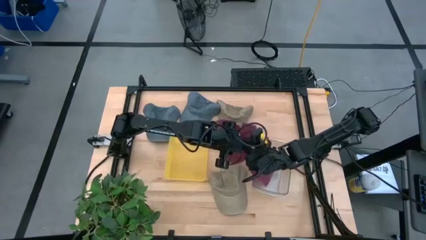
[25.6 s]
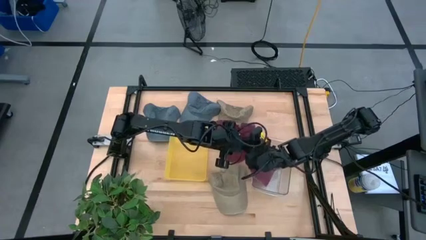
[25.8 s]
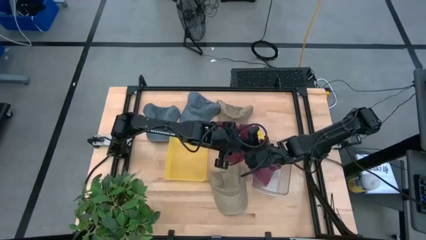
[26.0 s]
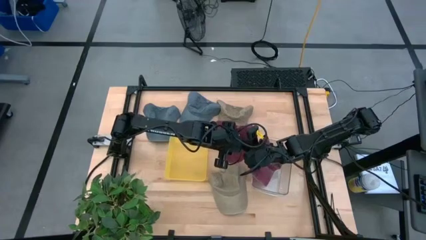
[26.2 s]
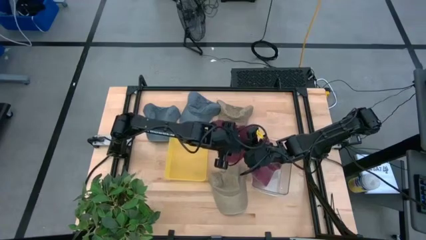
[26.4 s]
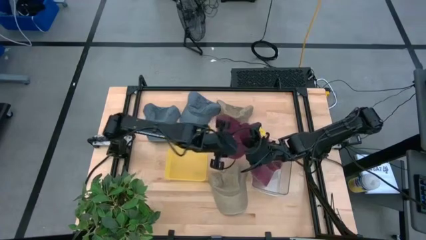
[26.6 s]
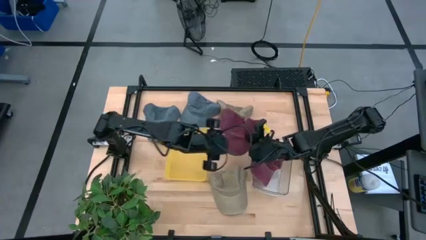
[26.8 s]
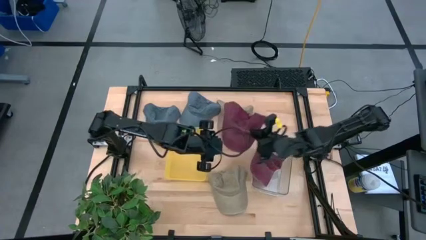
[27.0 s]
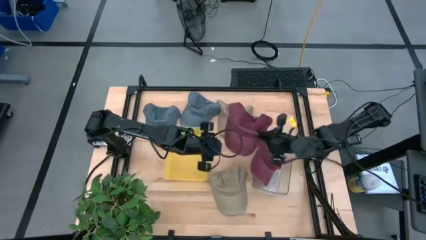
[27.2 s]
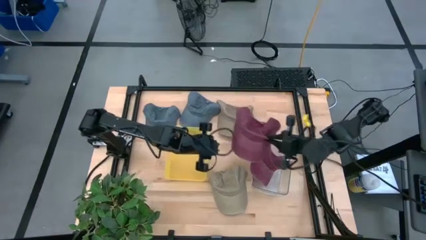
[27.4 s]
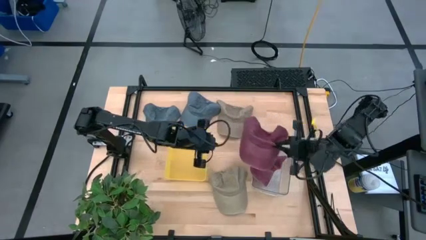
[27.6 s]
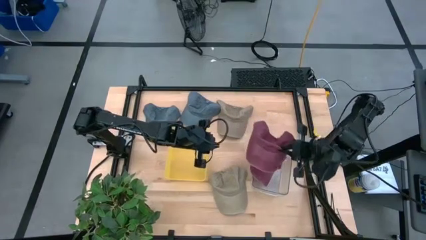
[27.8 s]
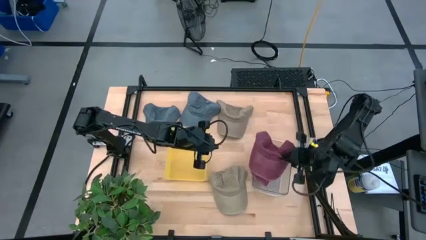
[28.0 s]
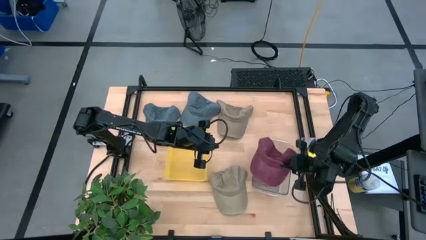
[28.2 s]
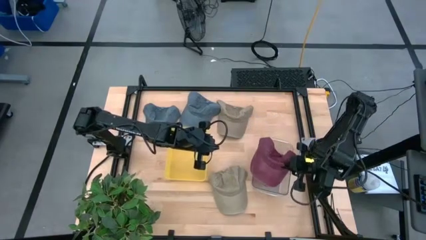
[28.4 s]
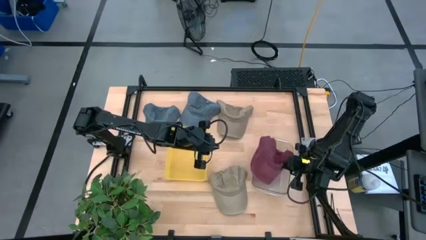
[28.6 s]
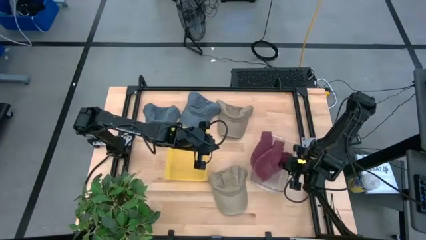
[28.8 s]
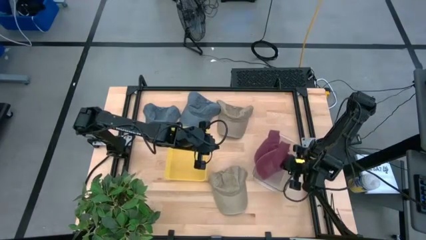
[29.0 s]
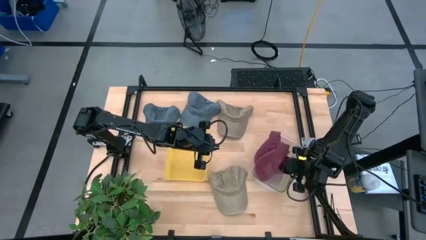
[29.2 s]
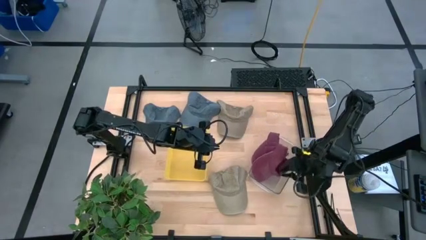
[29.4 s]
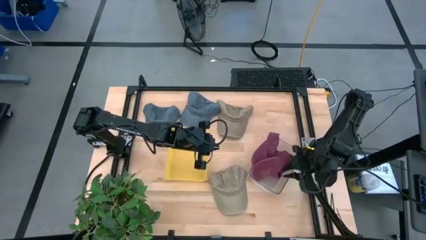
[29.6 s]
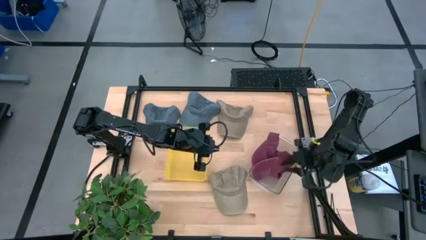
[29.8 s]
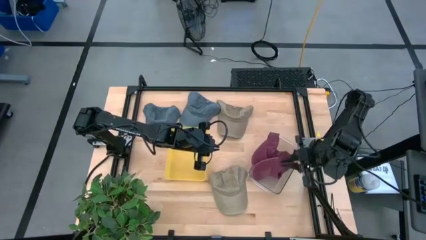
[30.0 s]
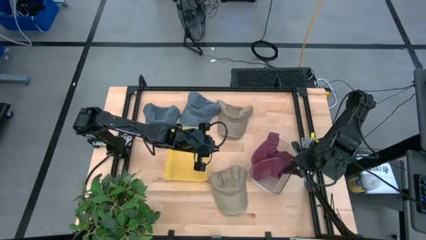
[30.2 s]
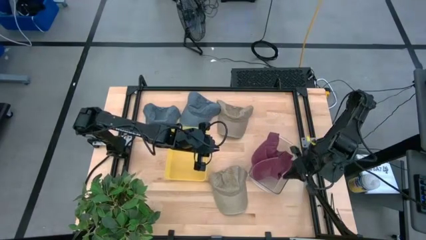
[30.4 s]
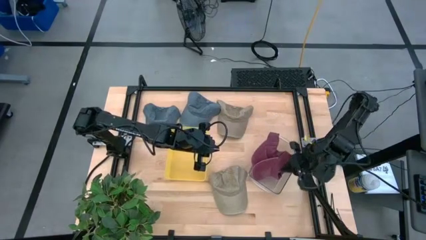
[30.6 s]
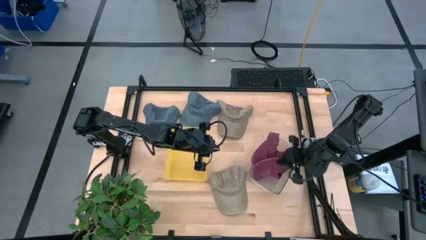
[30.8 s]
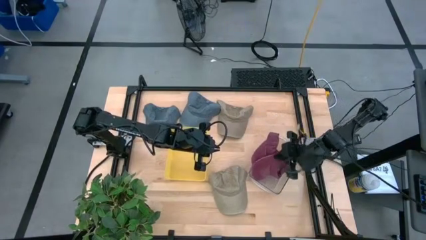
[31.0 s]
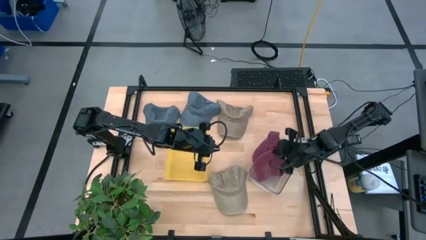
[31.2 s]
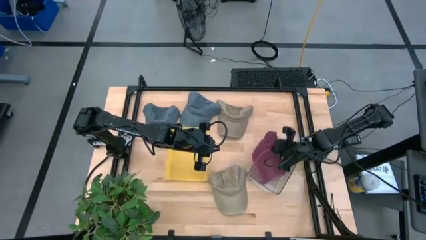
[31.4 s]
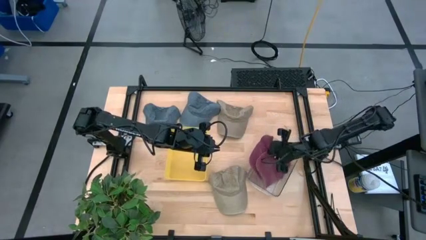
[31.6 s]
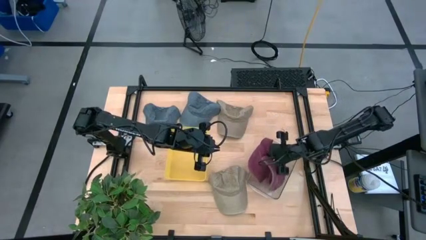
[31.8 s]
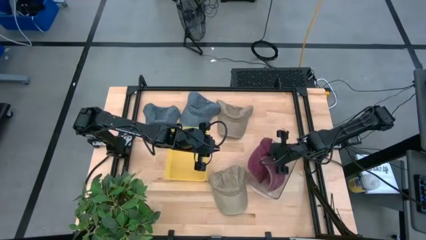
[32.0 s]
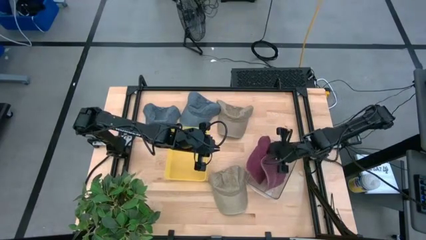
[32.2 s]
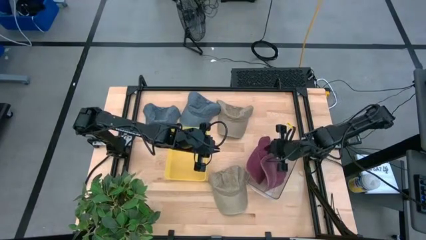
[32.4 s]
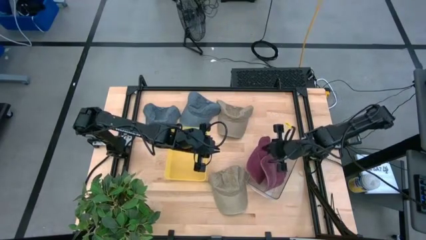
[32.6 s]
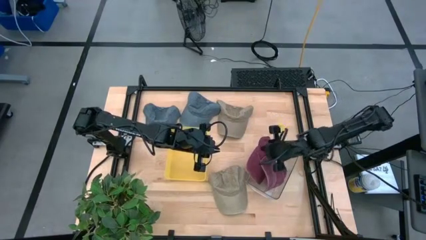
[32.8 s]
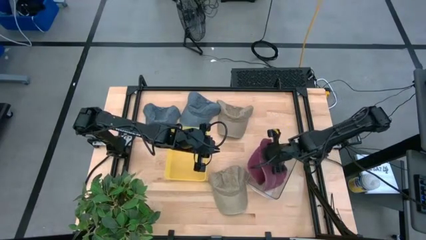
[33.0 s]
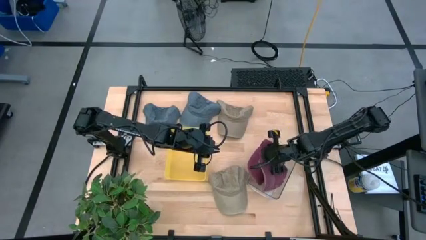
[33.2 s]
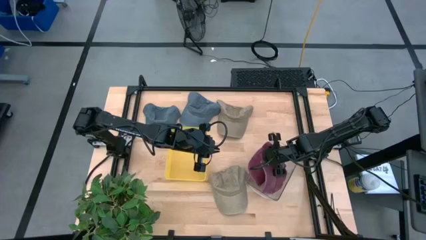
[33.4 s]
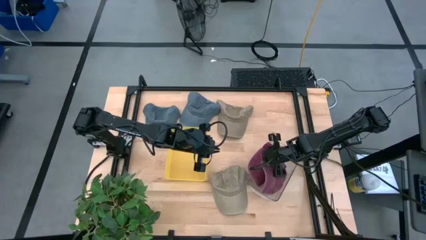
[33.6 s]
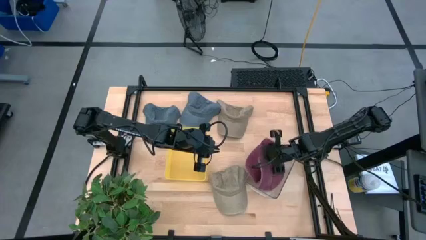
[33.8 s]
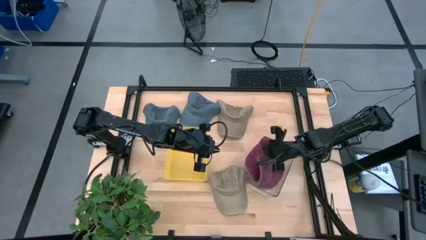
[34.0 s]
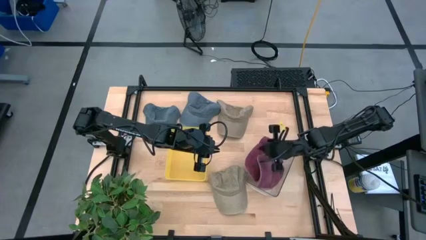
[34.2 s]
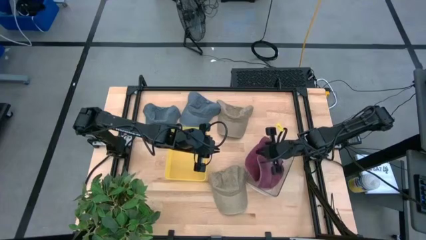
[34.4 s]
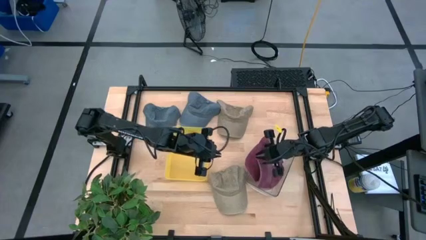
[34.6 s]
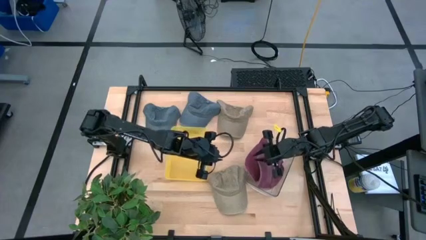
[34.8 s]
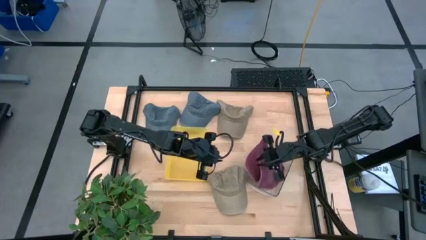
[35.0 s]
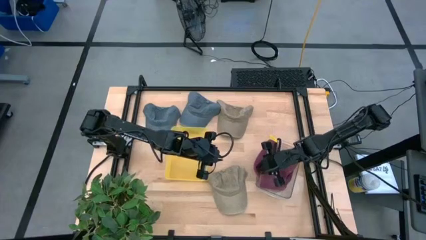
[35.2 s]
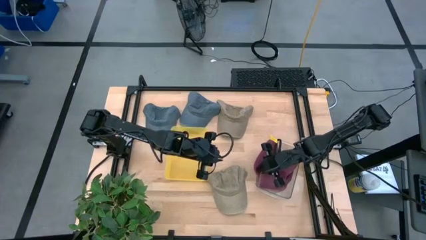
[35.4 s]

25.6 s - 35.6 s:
Task: Pick & Place hat
Put the red cap into the transparent bin

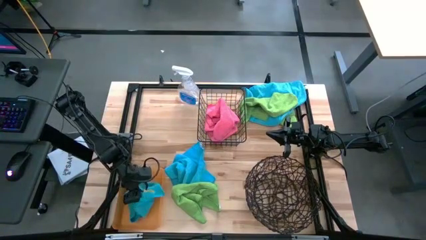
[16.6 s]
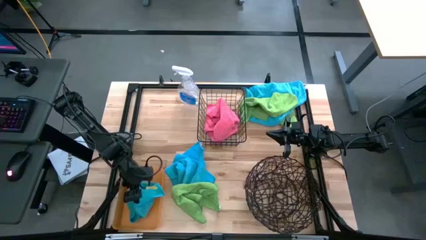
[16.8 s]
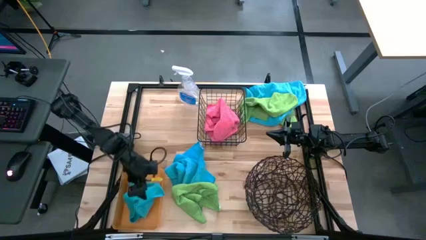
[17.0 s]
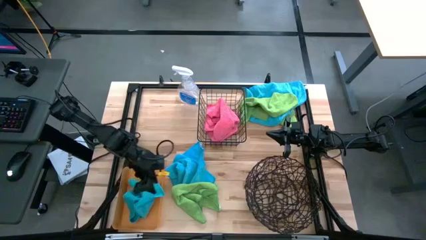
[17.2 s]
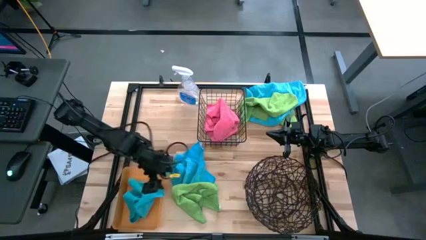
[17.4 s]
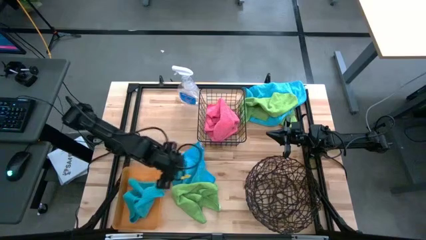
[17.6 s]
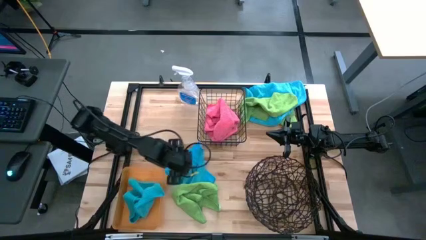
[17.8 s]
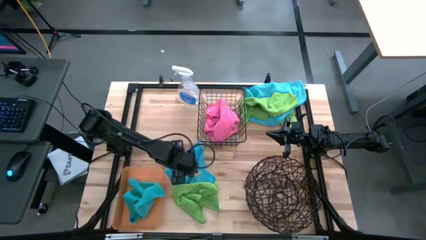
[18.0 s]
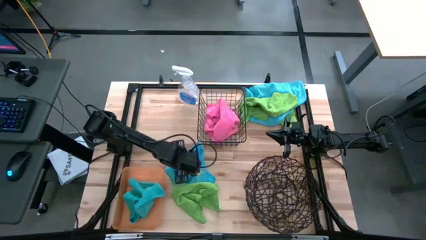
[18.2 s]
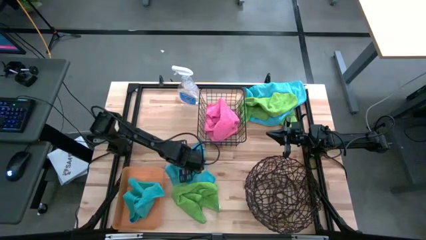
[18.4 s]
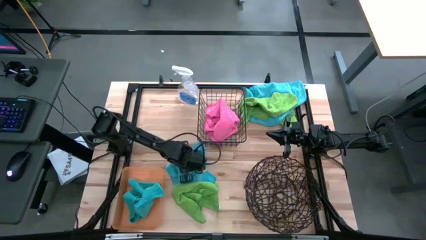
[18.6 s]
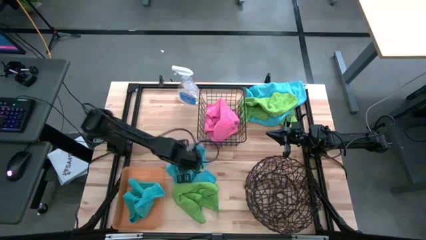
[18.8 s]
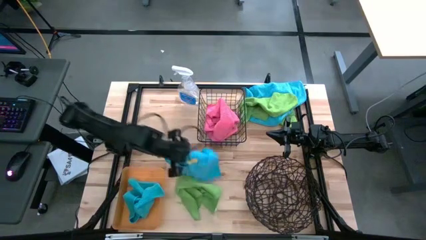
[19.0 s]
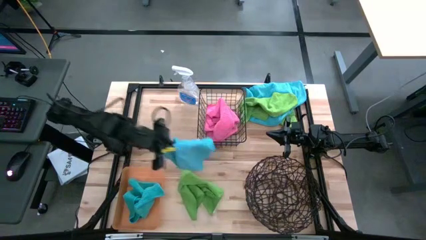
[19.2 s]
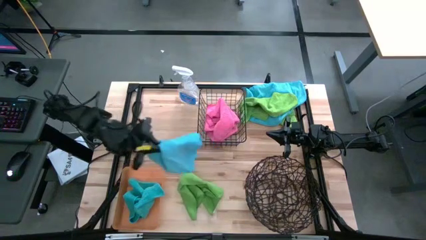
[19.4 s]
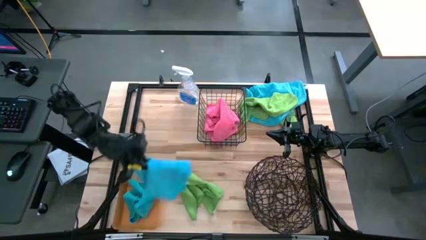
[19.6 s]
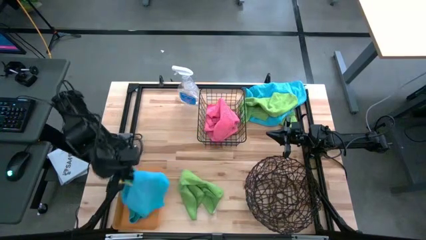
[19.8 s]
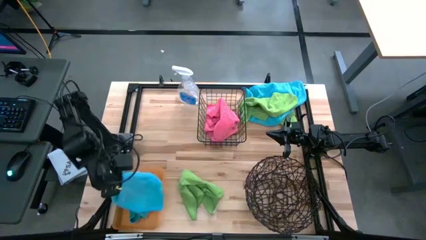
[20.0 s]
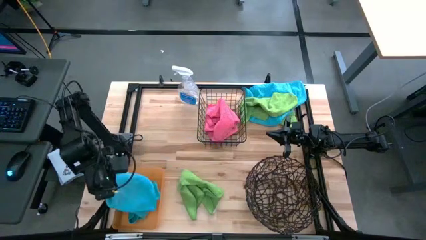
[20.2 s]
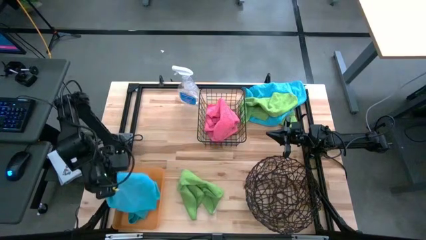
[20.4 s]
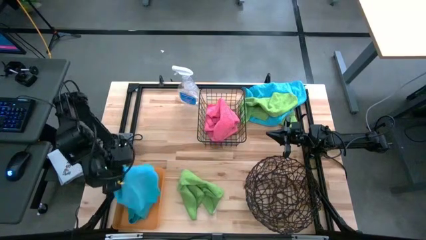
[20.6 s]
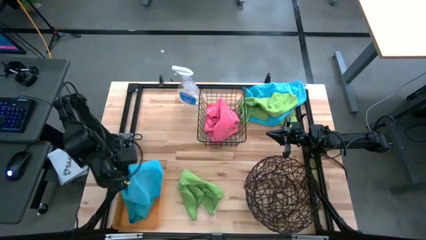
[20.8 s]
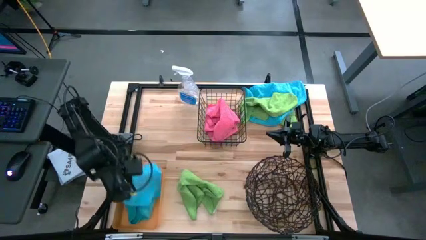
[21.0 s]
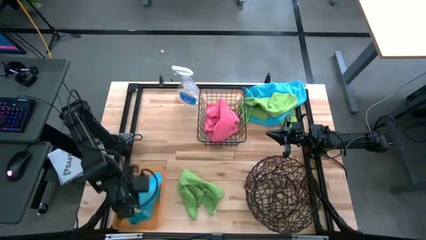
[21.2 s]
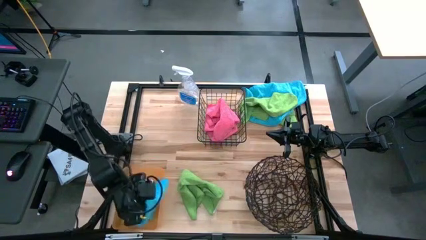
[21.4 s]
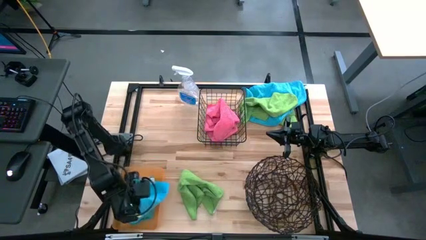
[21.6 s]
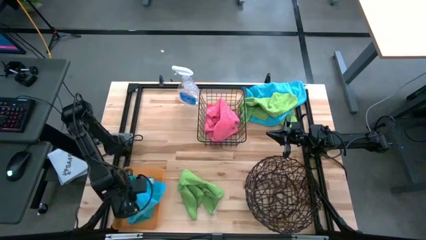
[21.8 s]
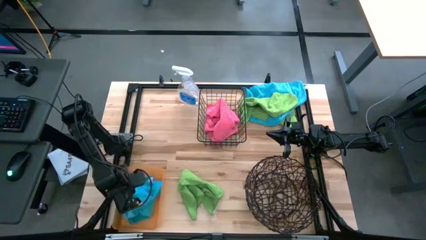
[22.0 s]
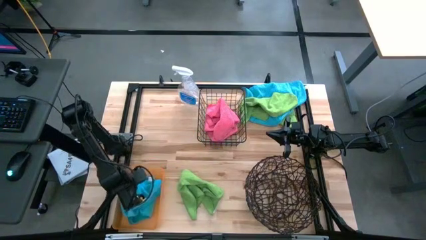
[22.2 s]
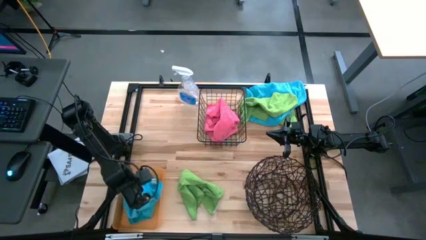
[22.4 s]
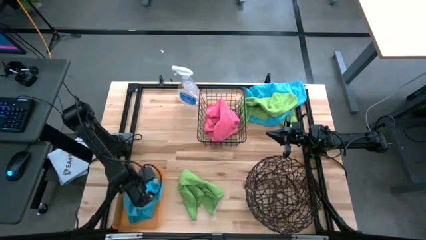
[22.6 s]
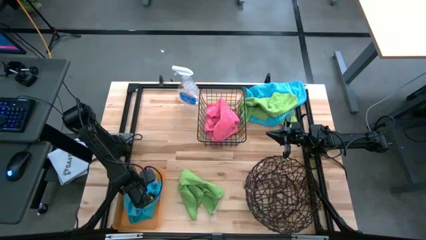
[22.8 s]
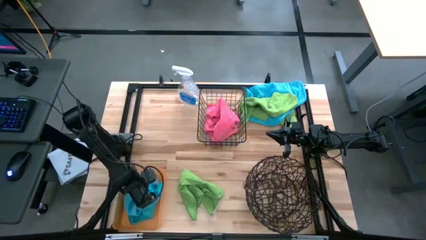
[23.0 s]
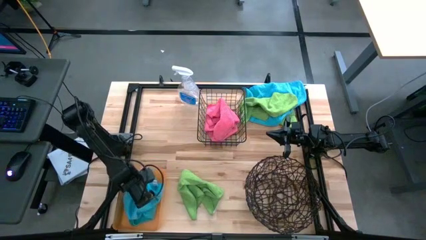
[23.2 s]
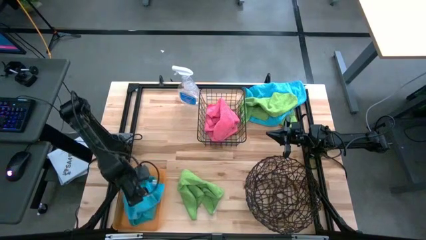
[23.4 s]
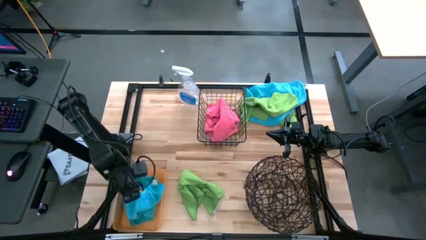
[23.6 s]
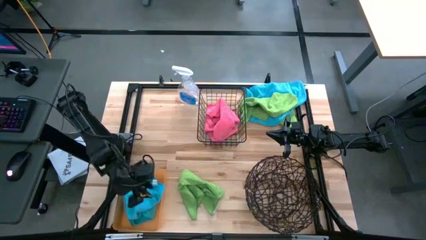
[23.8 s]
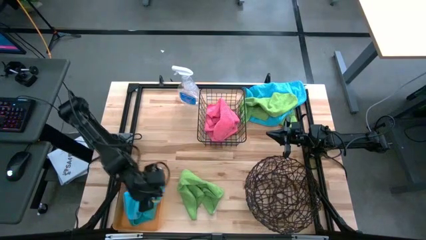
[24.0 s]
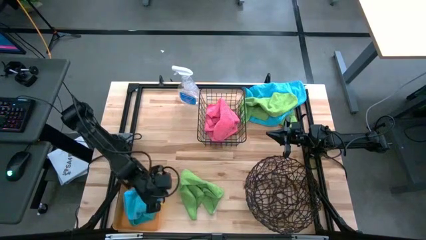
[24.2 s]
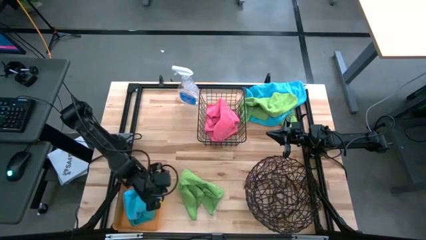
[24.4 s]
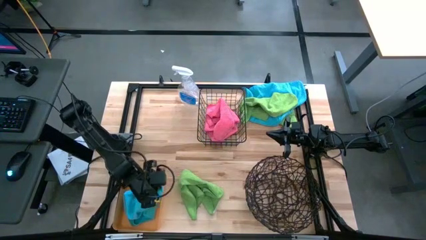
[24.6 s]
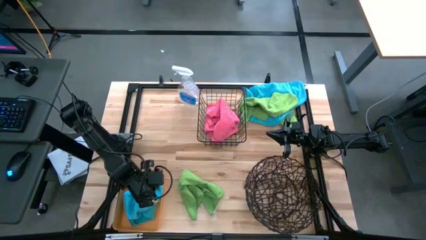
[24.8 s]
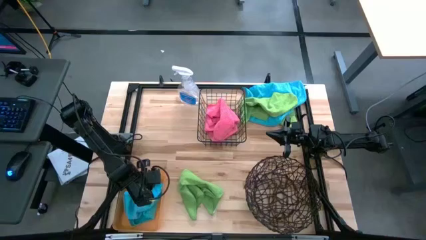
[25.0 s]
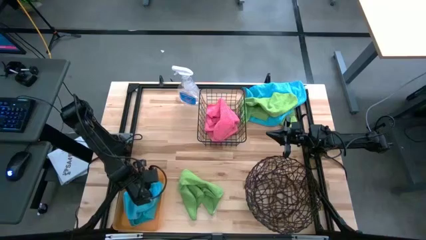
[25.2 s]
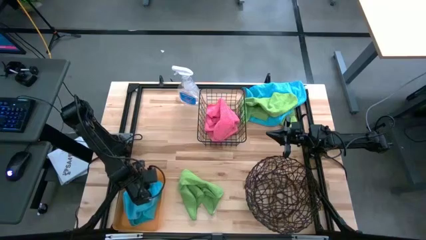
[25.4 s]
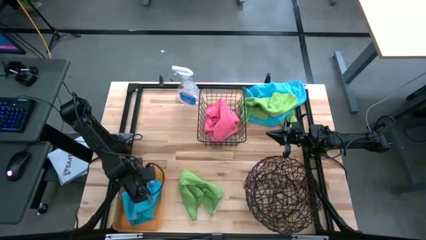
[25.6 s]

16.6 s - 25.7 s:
Task: Sort microfiber towel by color & place in baskets
Put the blue towel into the orange bin
